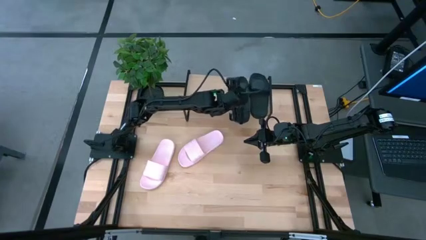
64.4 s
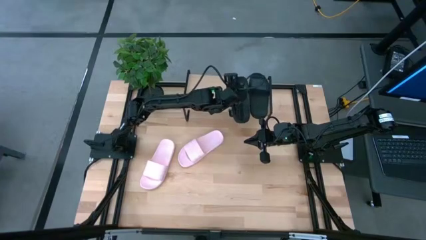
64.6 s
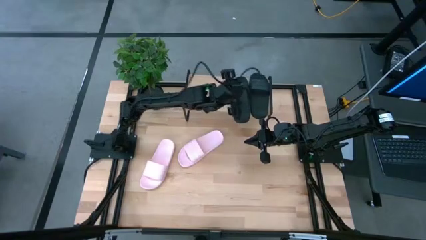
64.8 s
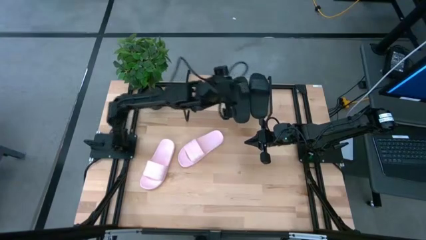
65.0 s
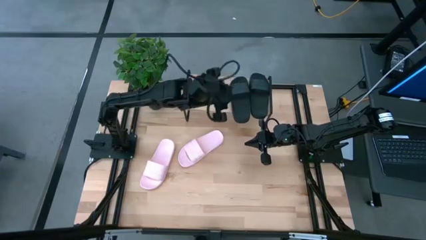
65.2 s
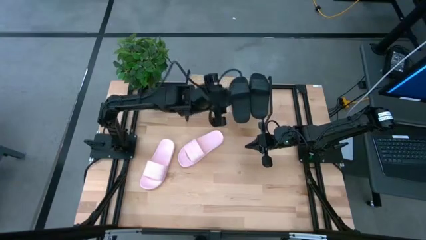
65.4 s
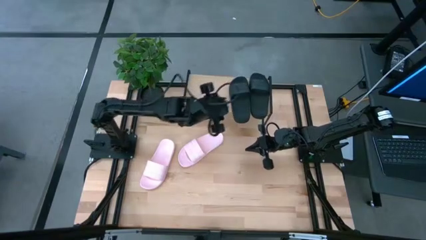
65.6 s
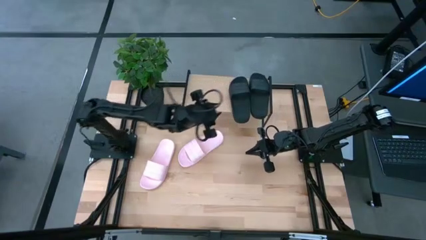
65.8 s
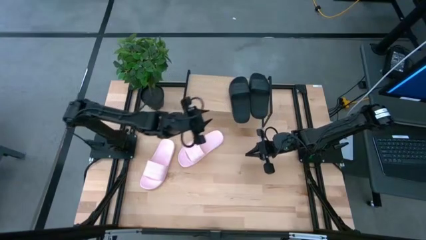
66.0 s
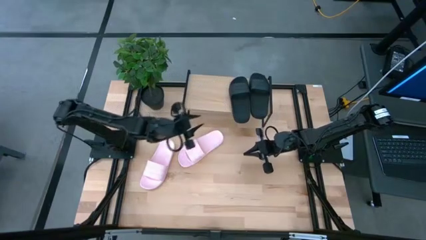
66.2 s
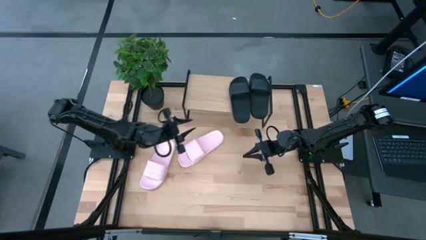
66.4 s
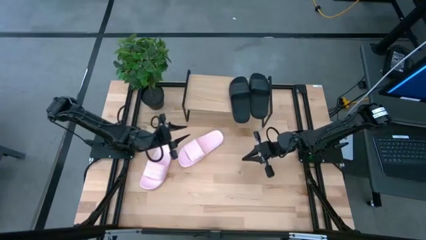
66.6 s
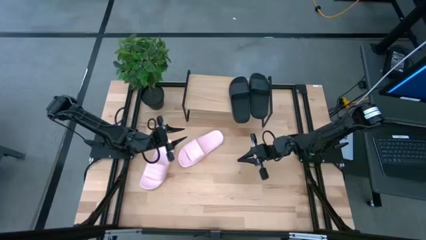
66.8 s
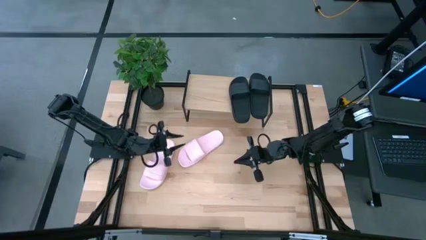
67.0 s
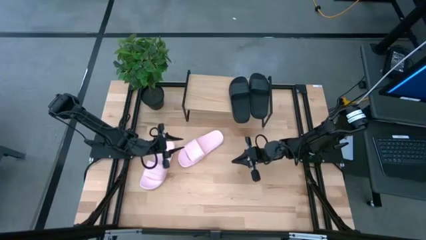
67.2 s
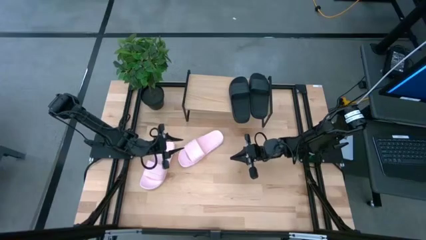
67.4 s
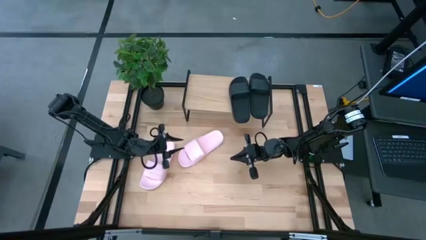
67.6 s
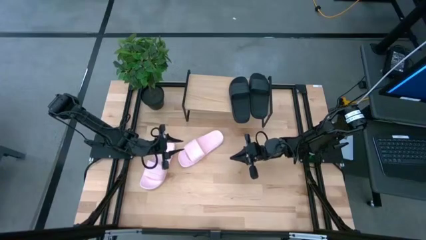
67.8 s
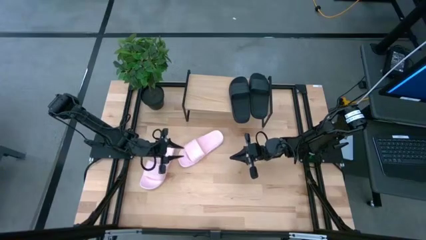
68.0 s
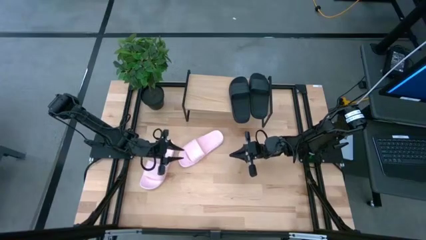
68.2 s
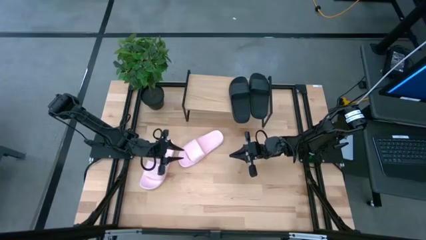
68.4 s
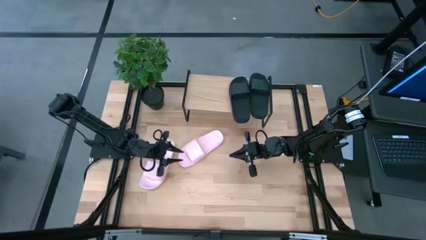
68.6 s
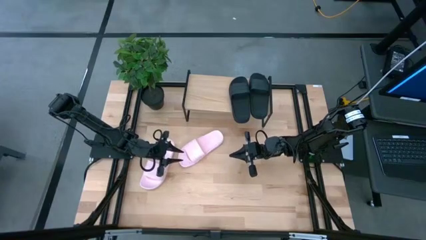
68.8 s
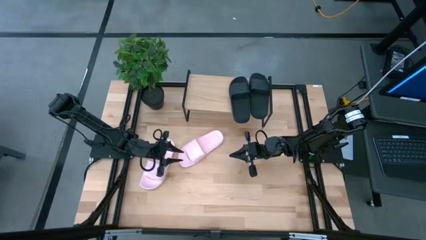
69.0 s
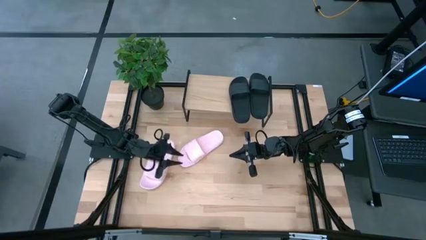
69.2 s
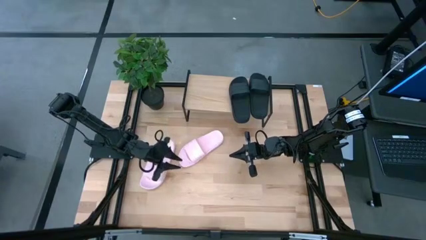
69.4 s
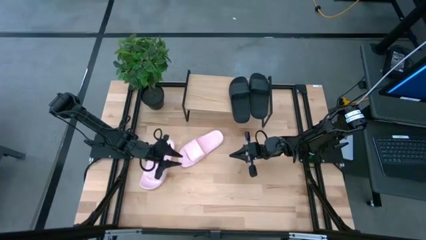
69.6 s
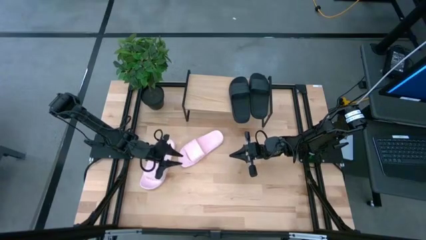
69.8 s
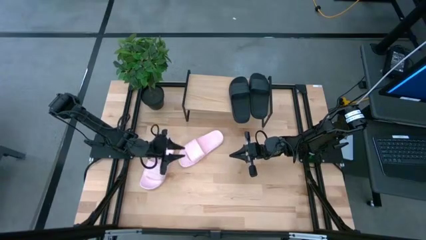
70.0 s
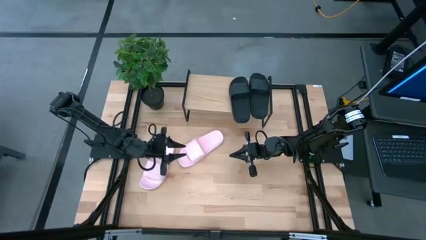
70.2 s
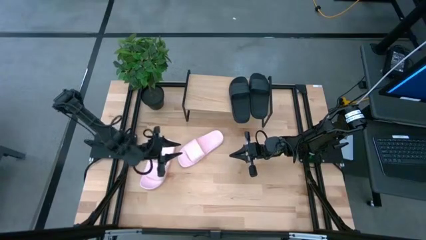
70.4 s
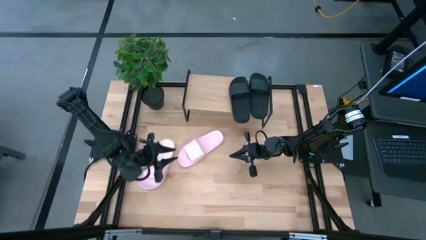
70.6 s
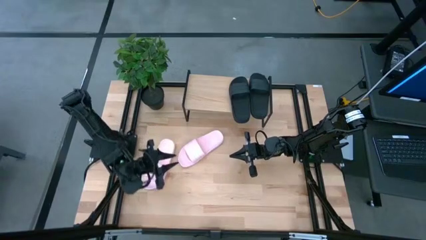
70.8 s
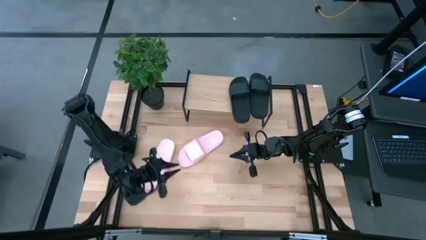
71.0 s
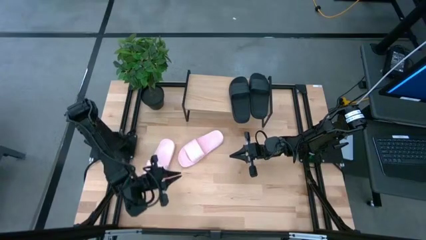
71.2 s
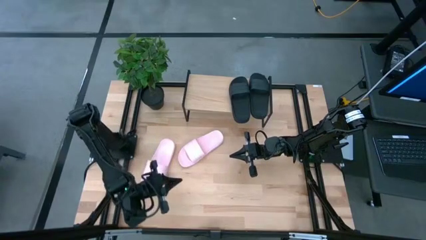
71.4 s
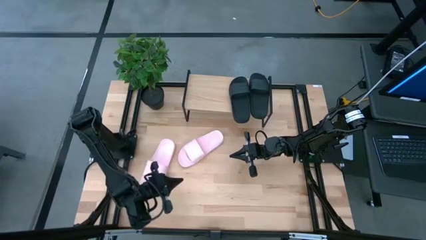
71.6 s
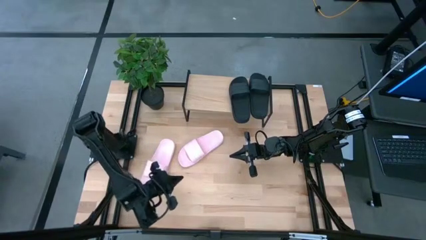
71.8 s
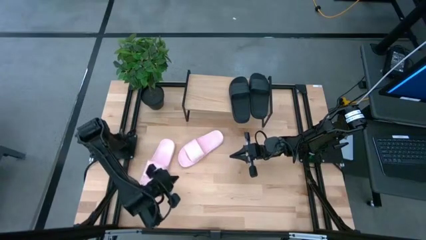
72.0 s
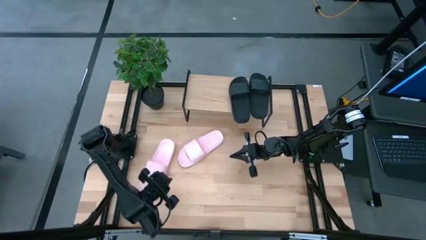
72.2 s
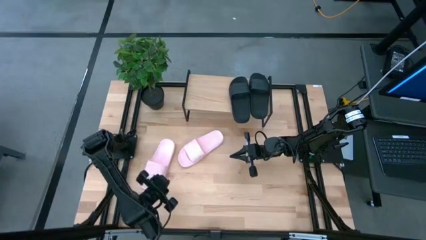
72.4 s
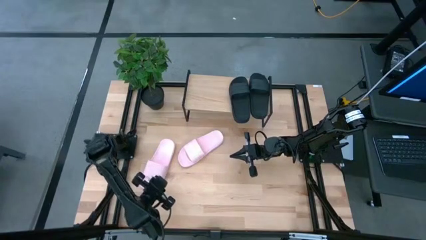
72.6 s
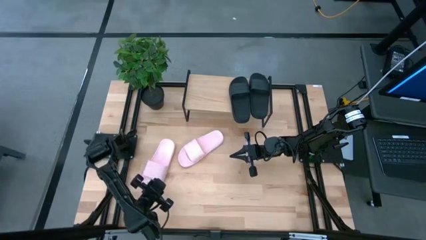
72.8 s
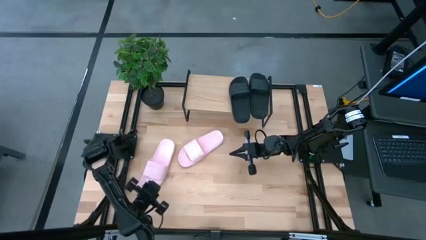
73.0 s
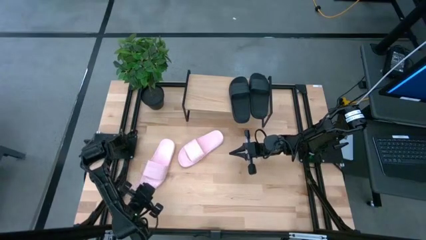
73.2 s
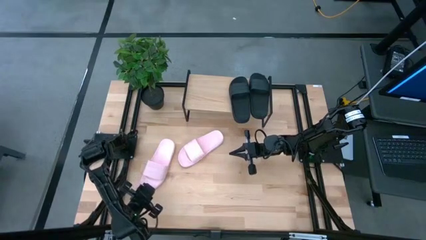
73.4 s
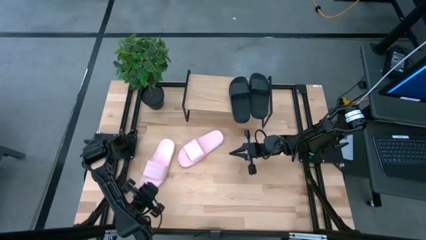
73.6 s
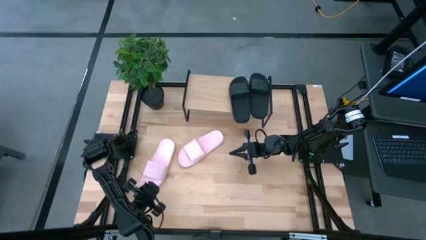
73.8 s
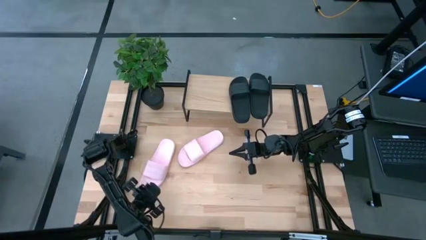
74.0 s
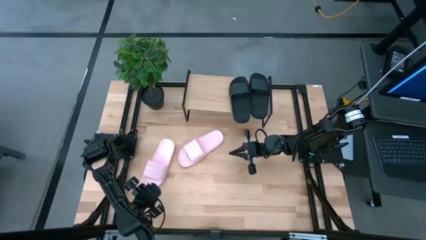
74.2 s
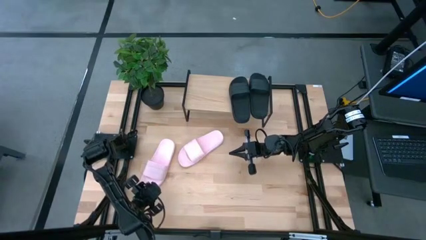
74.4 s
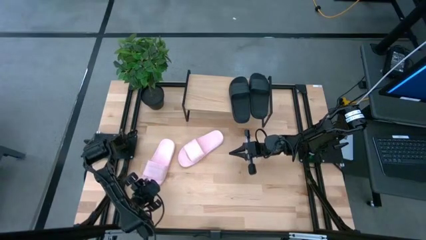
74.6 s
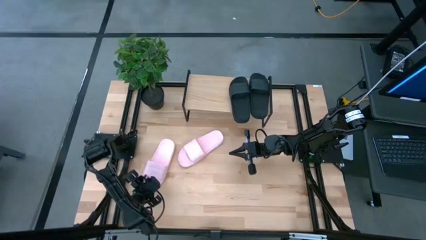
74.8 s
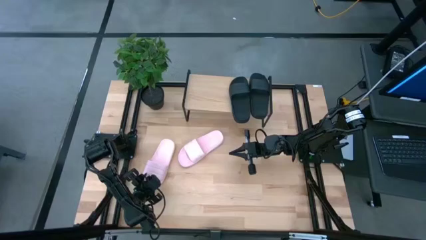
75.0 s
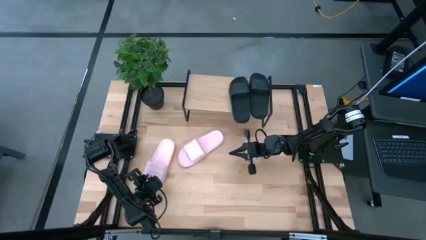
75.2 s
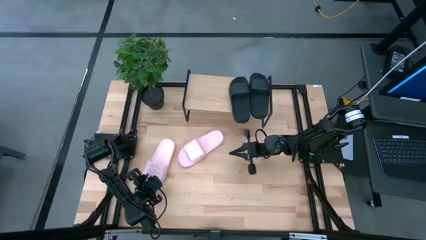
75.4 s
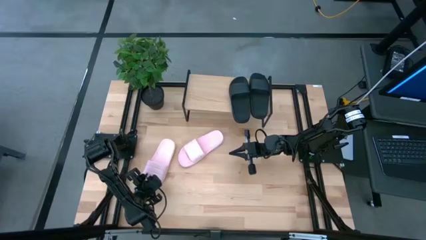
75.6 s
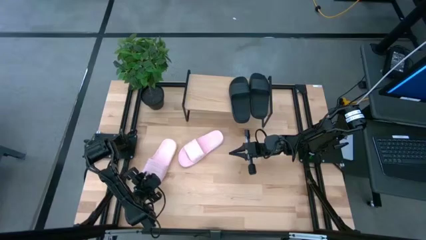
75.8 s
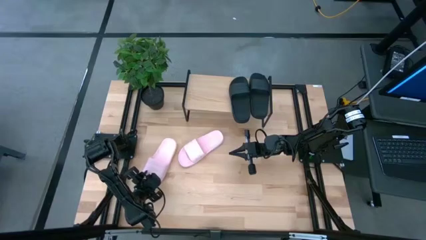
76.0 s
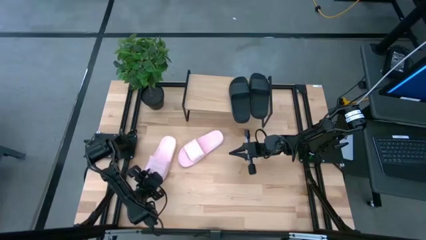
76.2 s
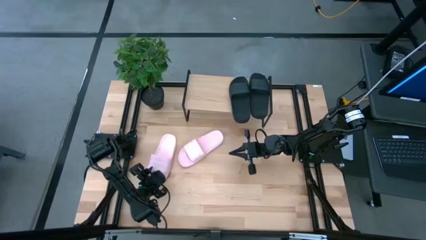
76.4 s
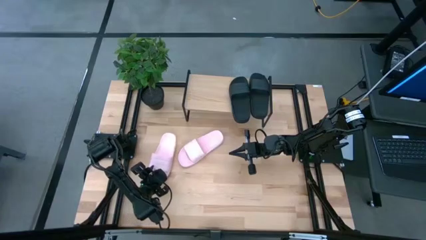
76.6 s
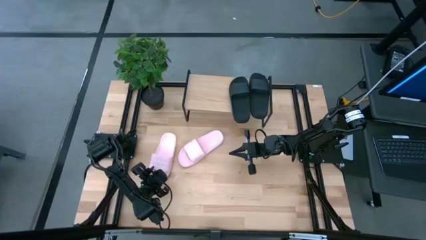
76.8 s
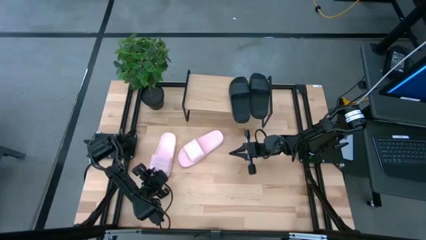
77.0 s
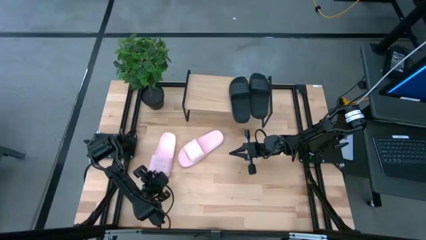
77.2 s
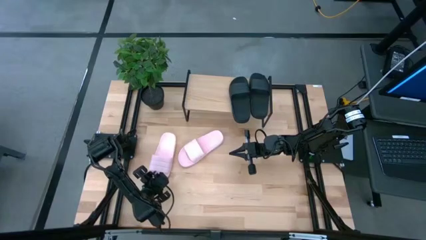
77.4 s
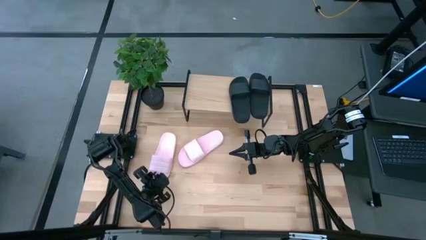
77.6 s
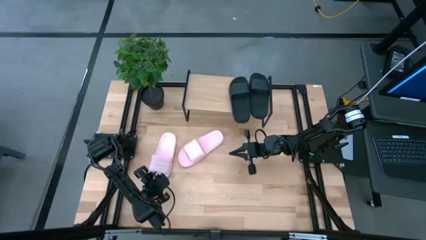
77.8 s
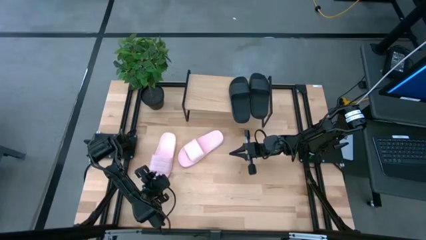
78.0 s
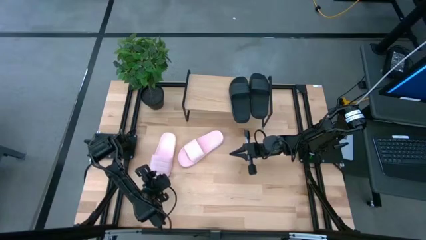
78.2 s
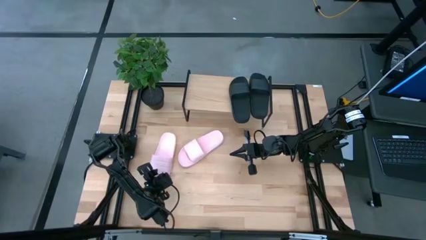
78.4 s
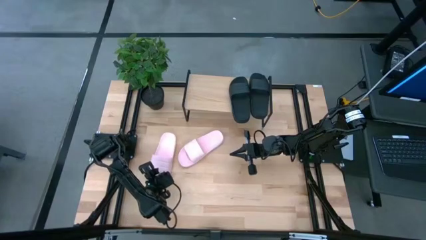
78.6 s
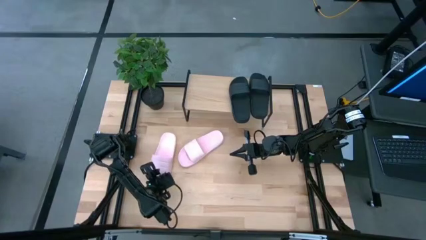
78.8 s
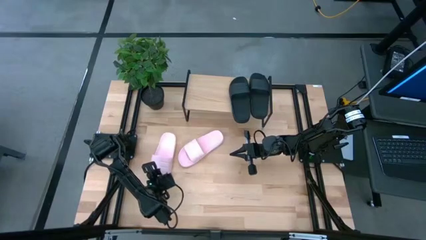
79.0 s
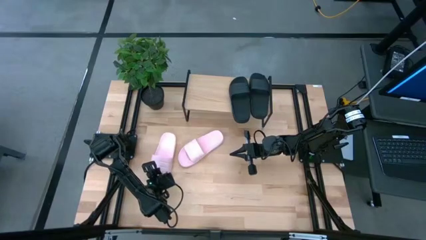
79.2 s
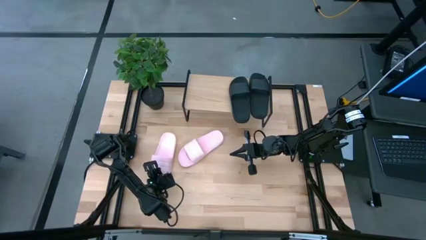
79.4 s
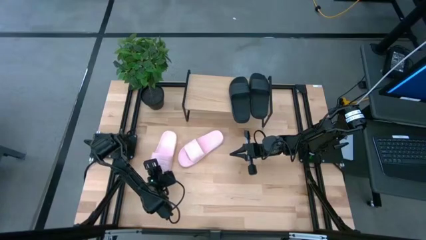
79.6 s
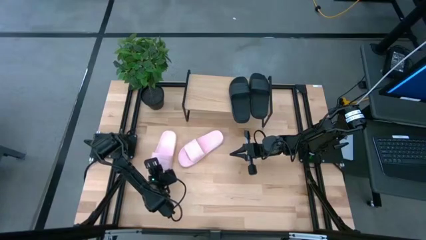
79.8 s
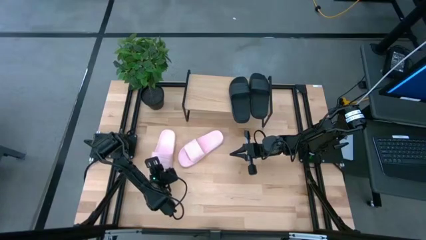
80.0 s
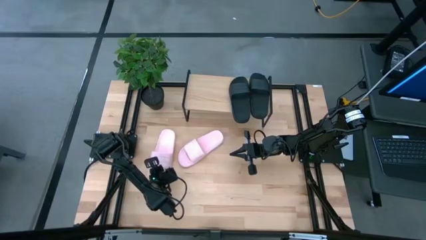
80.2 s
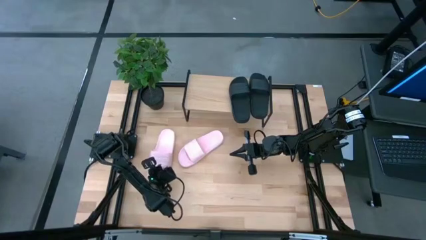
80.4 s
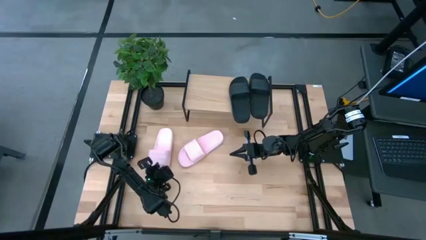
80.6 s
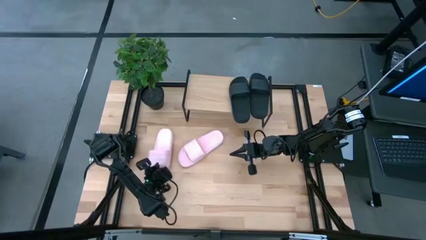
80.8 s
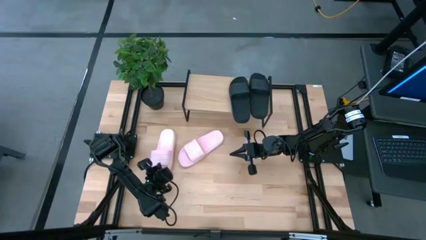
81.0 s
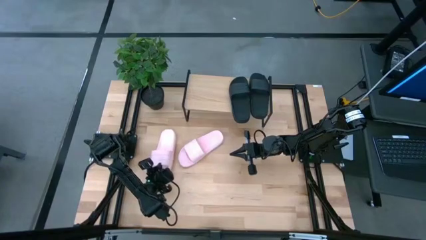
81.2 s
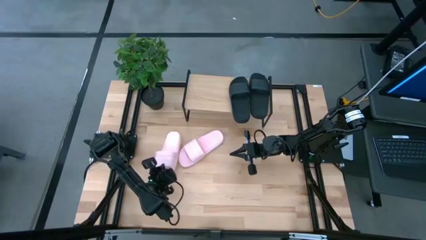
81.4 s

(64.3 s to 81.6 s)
Task: Pick and place slides into the shelf
Put the left pink slide on the shelf
